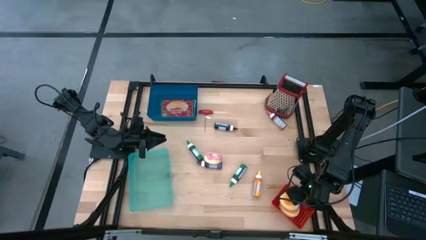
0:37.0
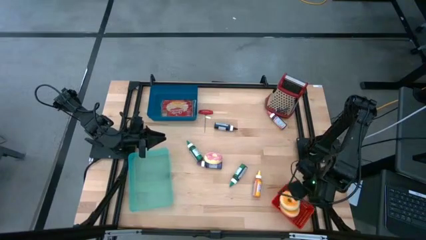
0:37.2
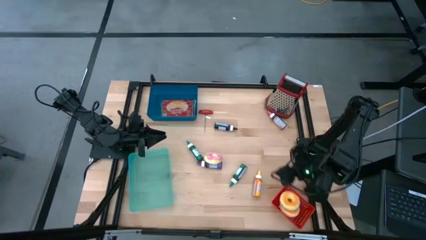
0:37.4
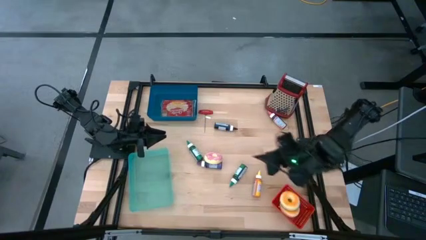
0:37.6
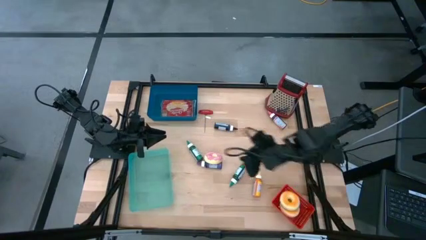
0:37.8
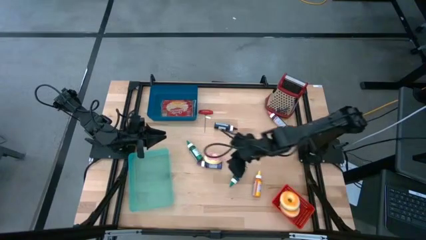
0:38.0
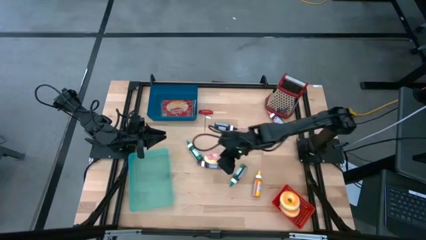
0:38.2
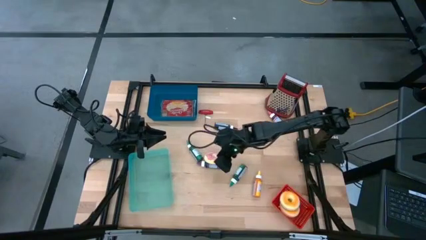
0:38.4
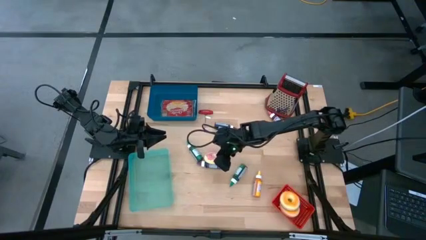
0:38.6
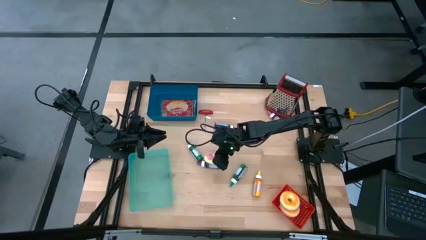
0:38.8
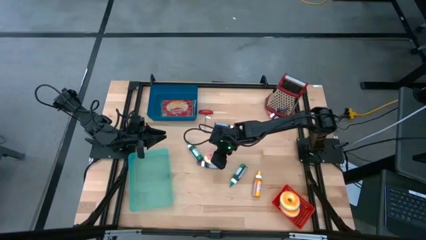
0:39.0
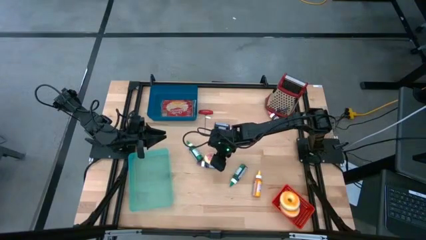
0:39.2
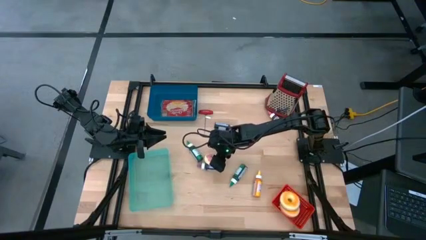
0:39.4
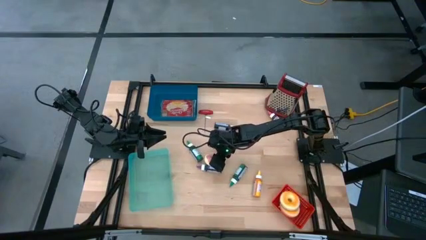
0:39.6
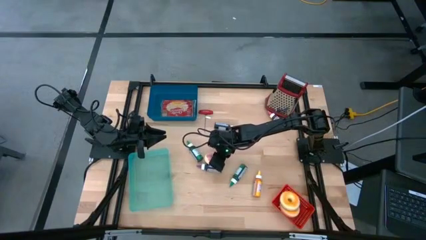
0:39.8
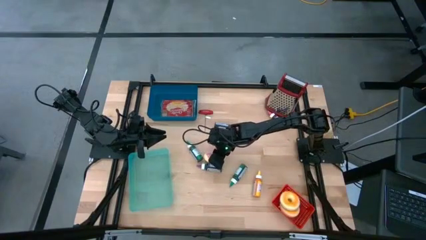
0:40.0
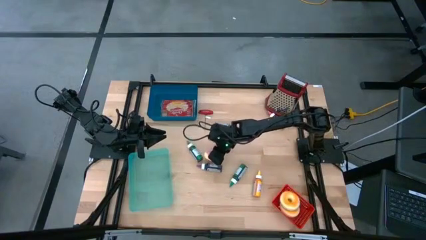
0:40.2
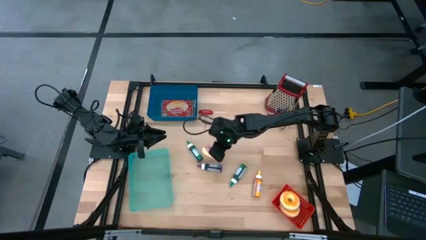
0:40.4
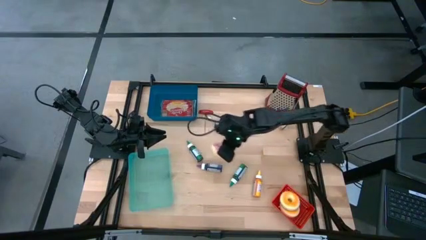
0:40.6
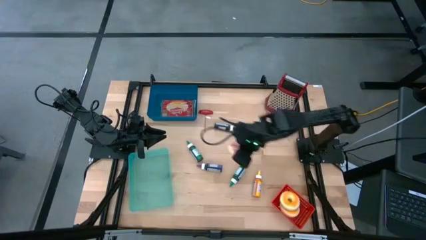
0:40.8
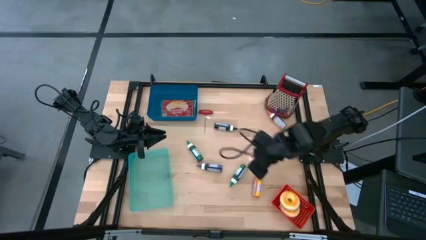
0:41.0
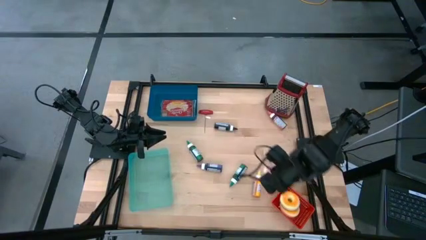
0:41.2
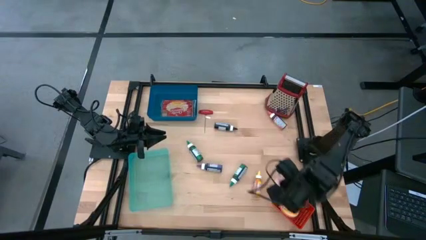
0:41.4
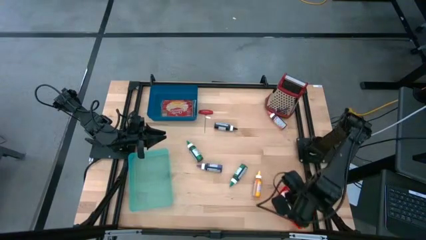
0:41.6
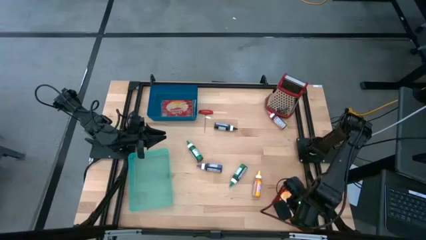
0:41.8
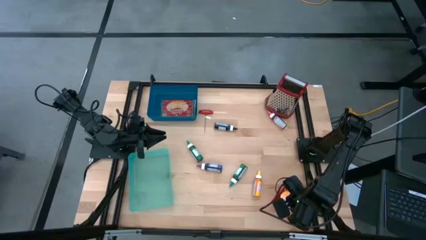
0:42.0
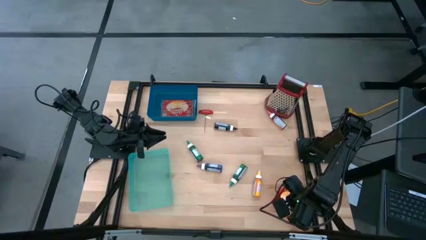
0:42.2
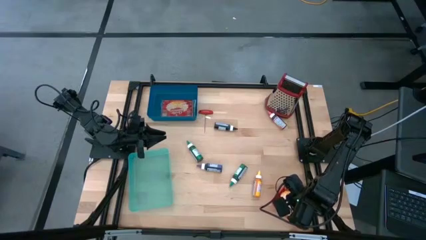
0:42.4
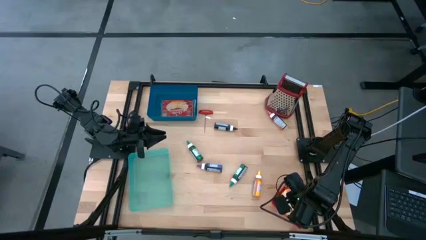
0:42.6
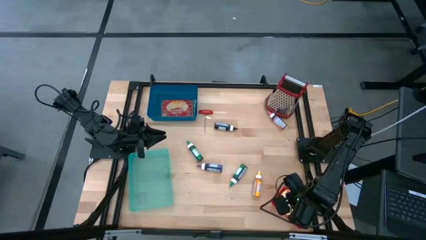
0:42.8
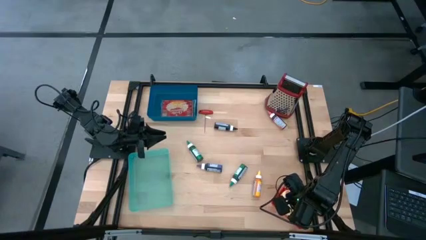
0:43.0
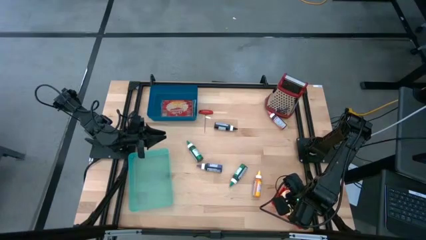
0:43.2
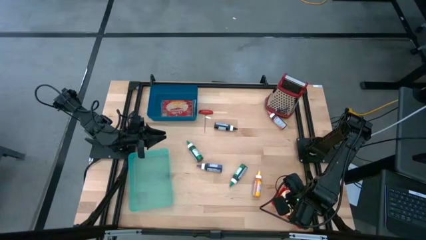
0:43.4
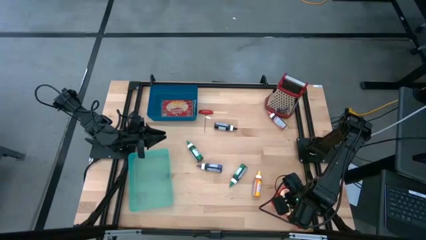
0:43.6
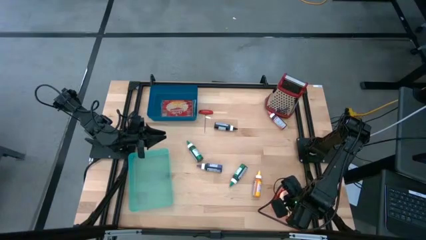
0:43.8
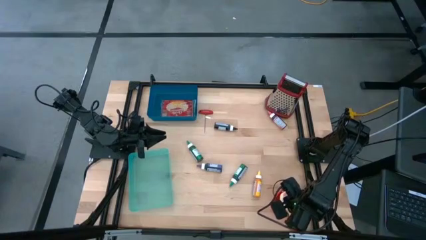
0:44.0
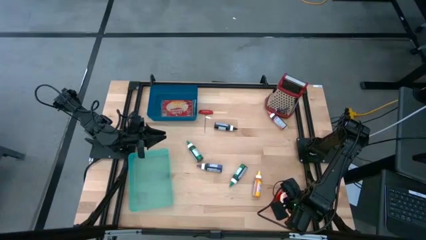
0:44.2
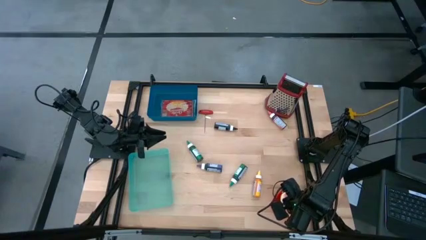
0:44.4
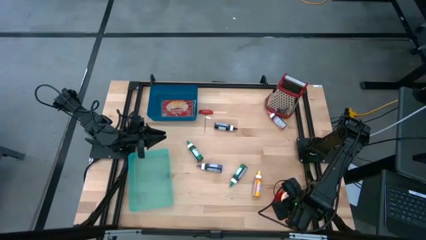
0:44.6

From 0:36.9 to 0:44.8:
Put the pink donut into the red bin

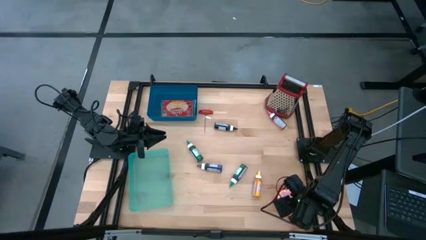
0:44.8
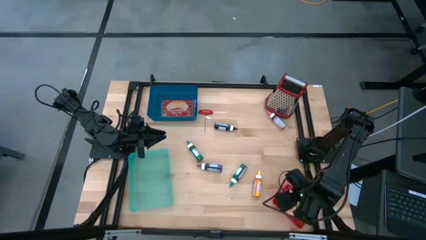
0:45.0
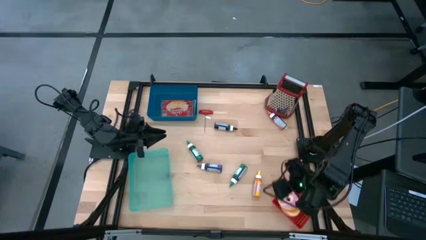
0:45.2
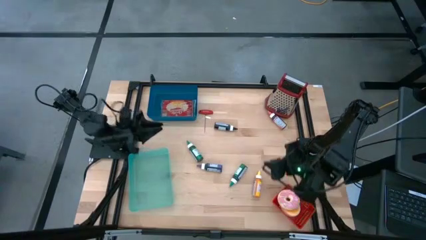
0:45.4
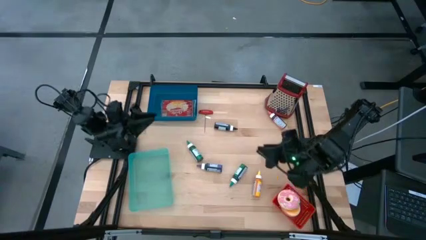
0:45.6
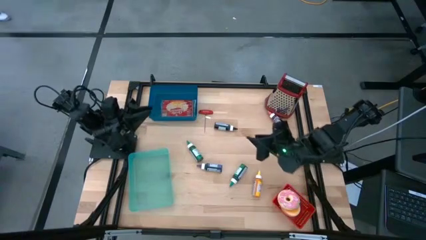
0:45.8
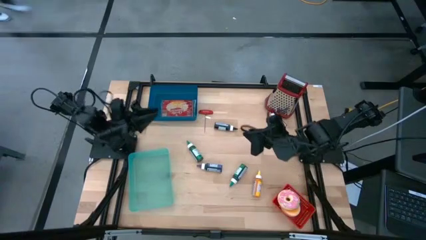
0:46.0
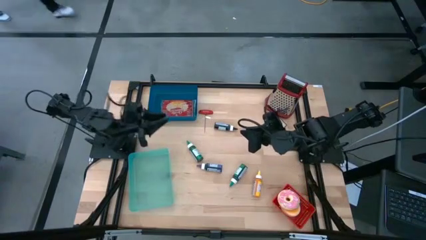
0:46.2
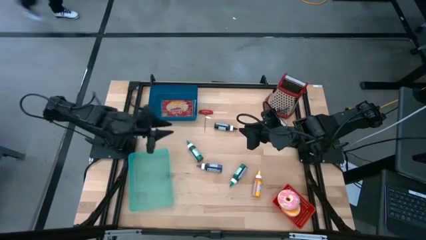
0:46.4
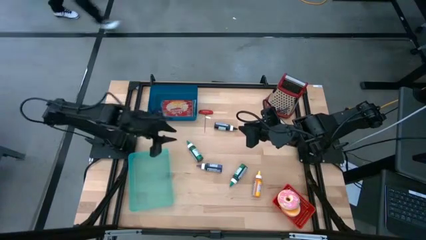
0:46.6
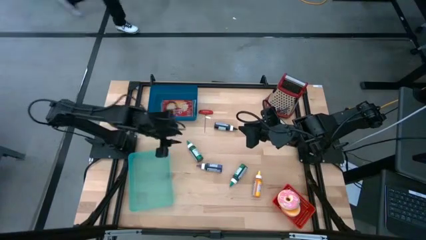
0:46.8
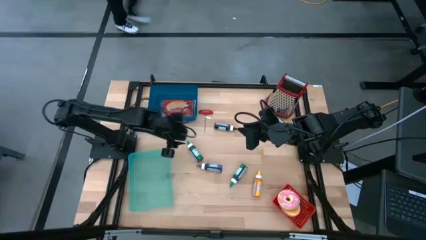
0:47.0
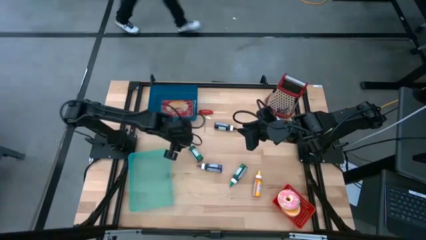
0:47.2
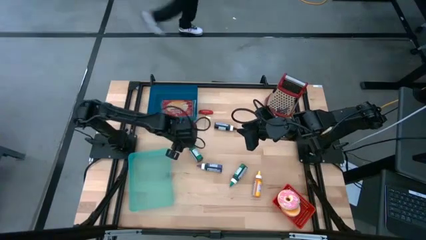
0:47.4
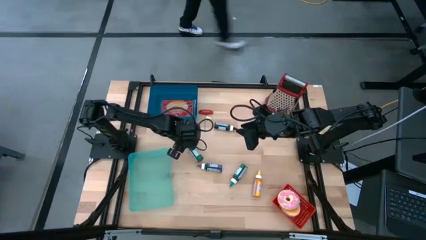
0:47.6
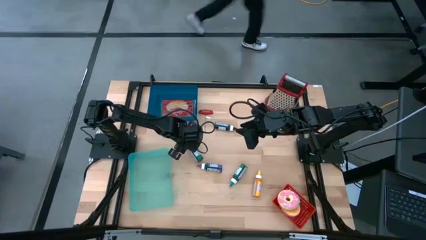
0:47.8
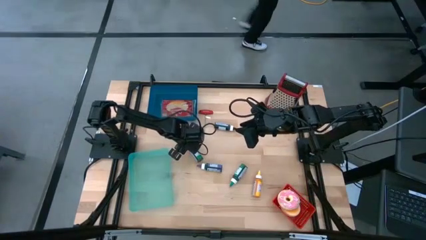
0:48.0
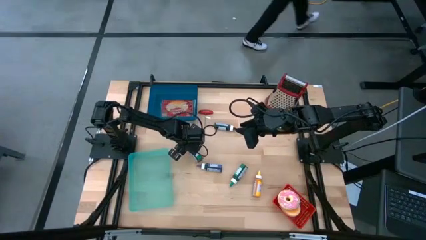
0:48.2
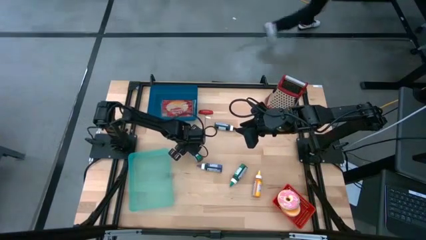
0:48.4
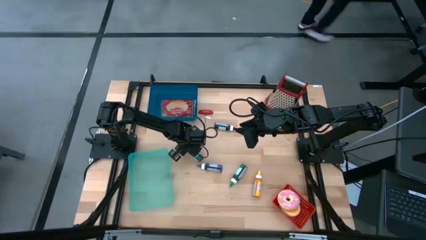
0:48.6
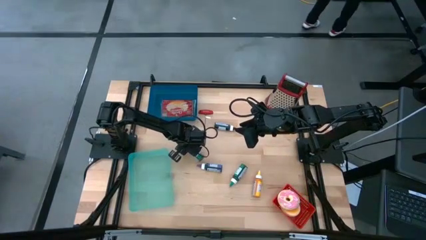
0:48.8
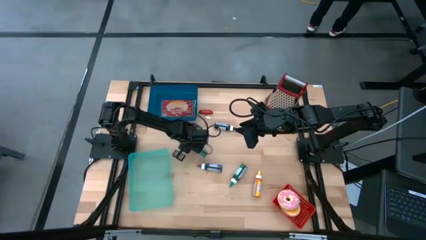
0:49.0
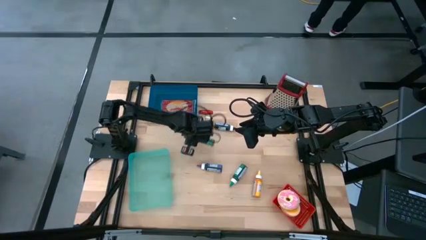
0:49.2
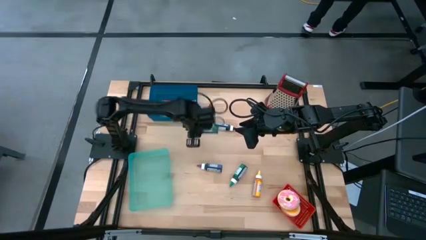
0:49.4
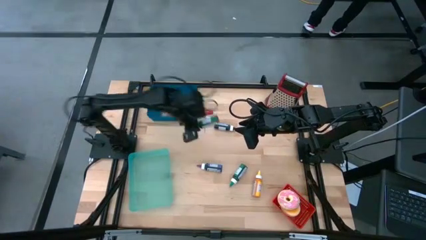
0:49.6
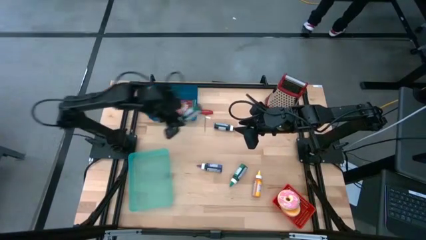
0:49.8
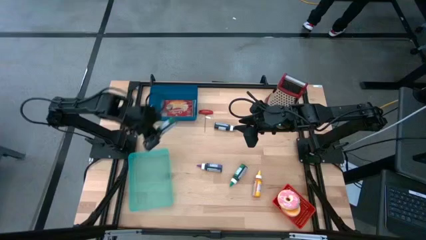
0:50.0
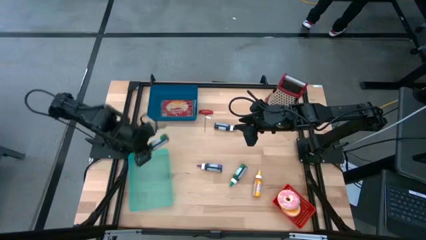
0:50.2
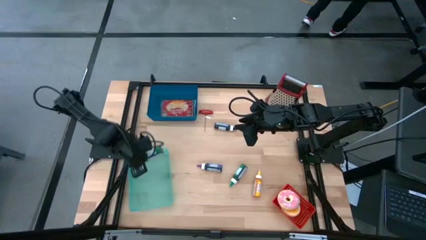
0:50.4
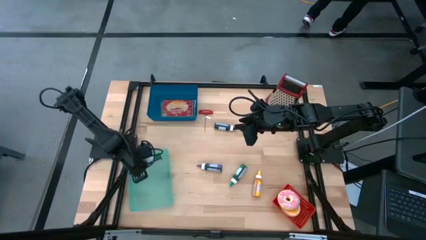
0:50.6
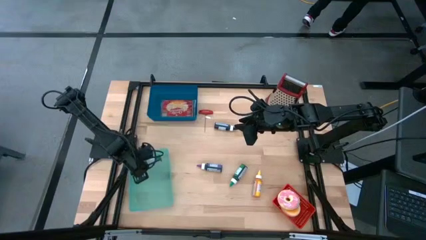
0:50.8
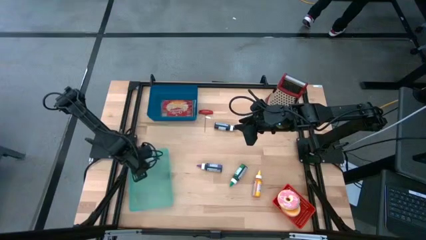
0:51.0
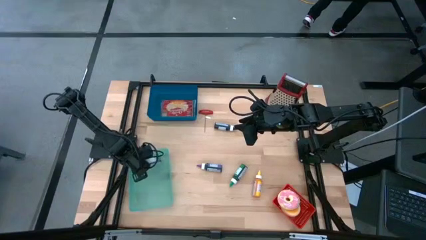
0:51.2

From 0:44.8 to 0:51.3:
Put the left green food coloring bottle into the green bin
